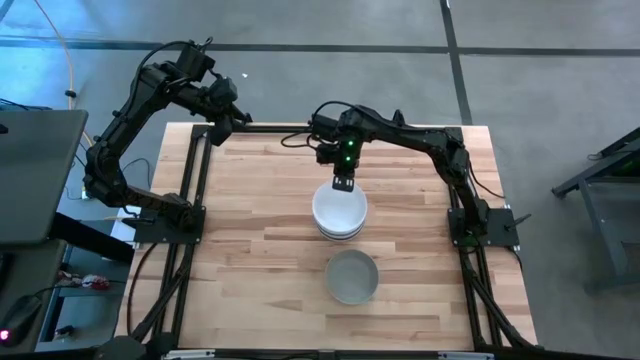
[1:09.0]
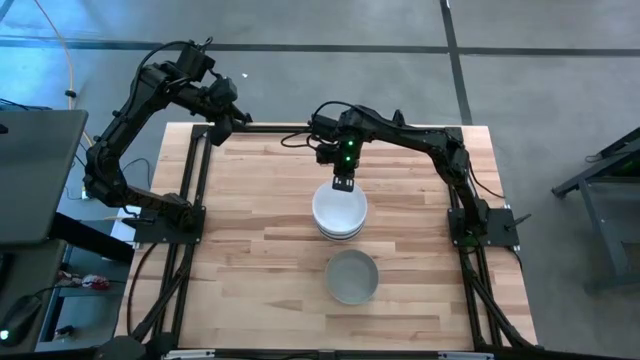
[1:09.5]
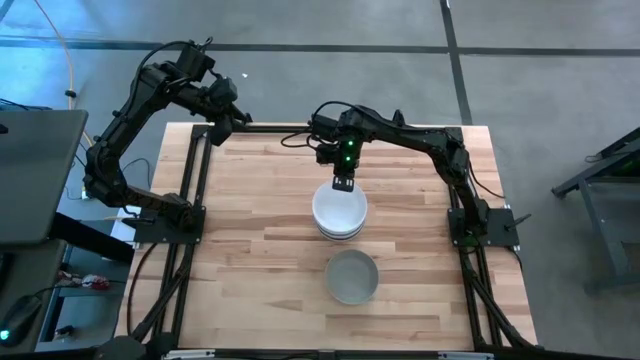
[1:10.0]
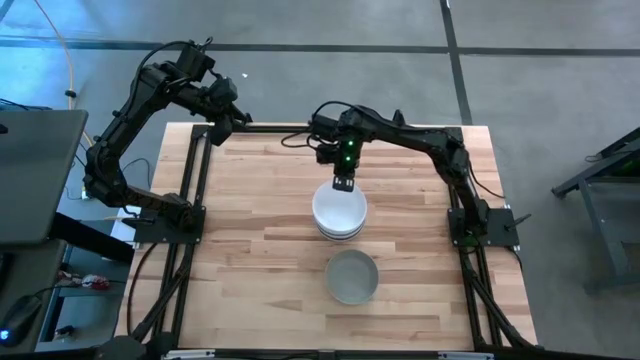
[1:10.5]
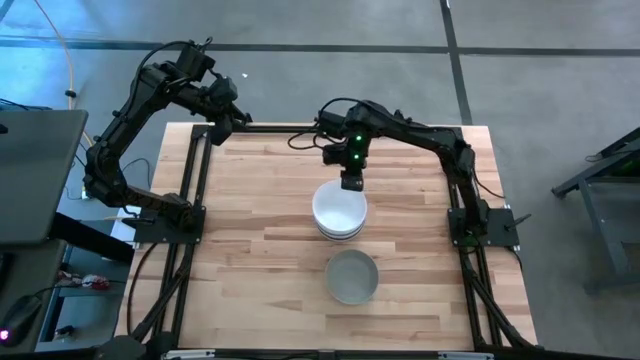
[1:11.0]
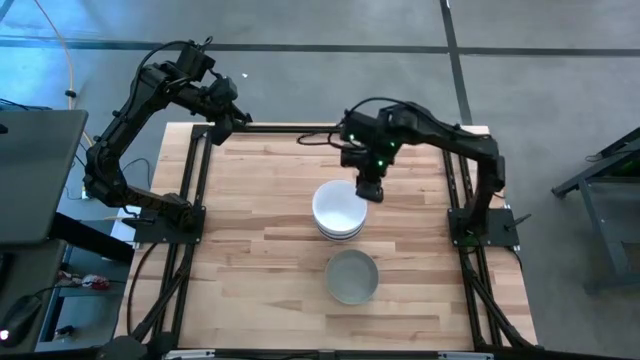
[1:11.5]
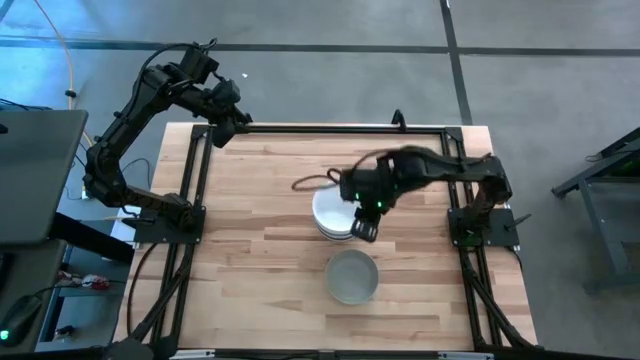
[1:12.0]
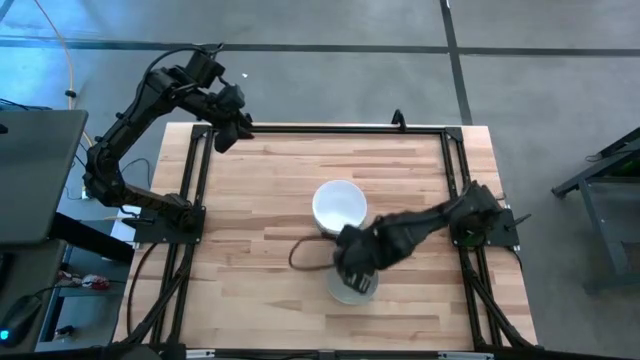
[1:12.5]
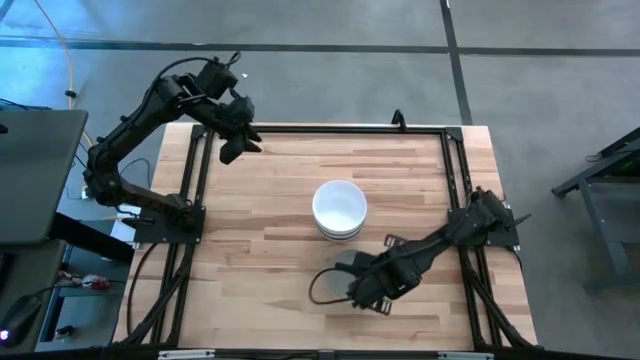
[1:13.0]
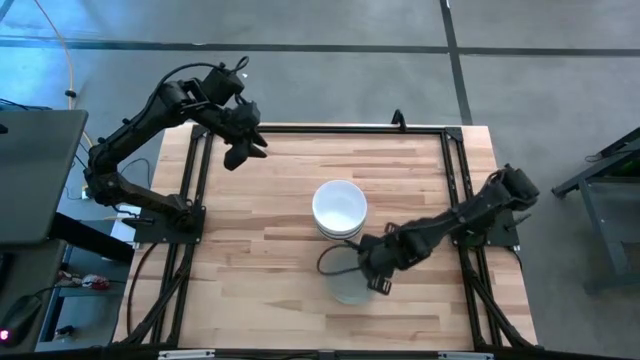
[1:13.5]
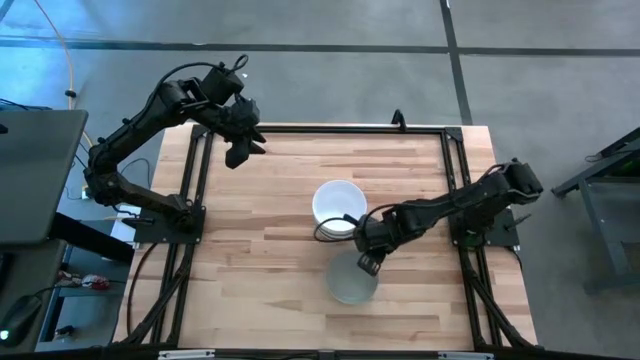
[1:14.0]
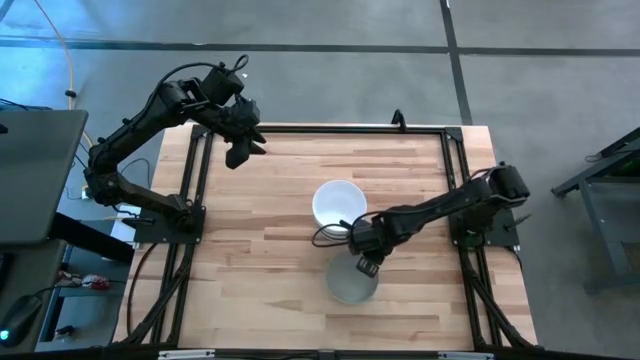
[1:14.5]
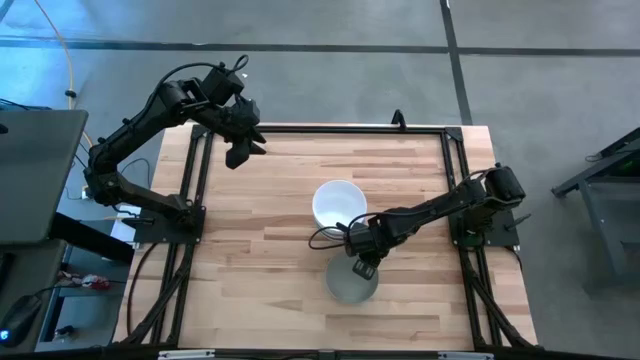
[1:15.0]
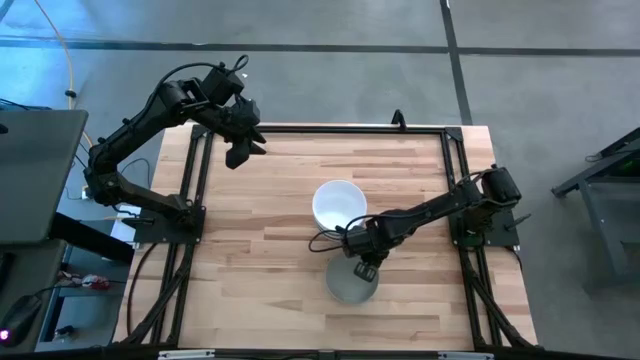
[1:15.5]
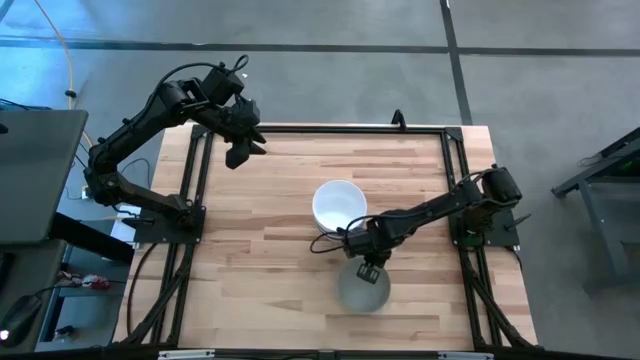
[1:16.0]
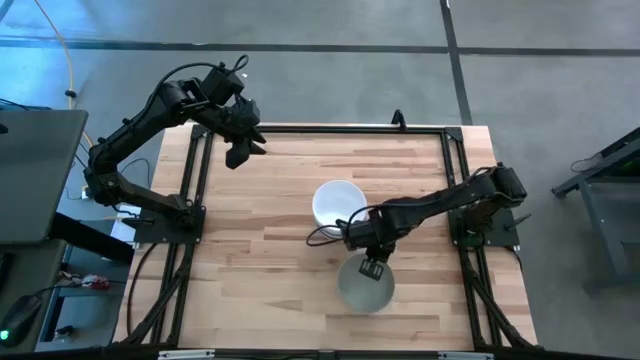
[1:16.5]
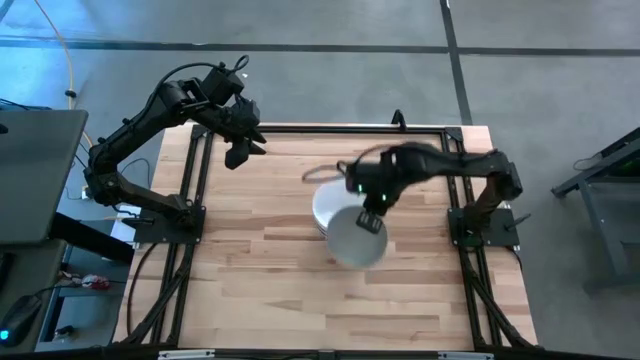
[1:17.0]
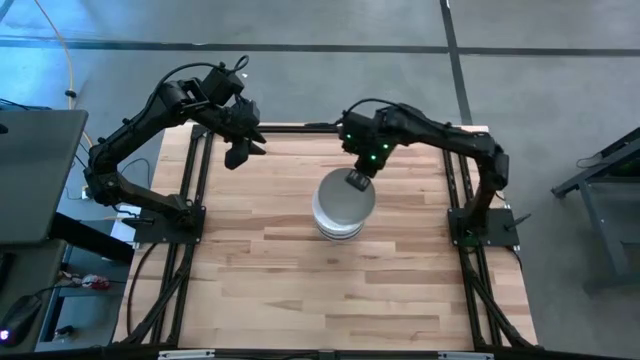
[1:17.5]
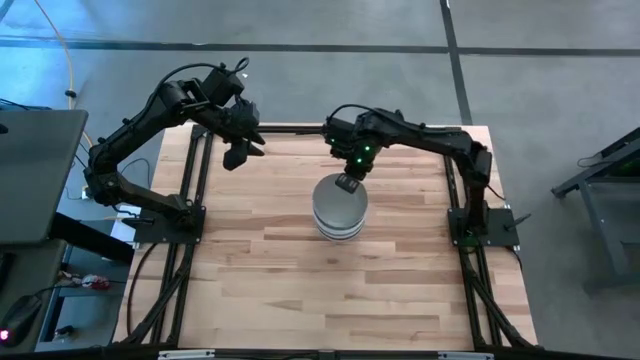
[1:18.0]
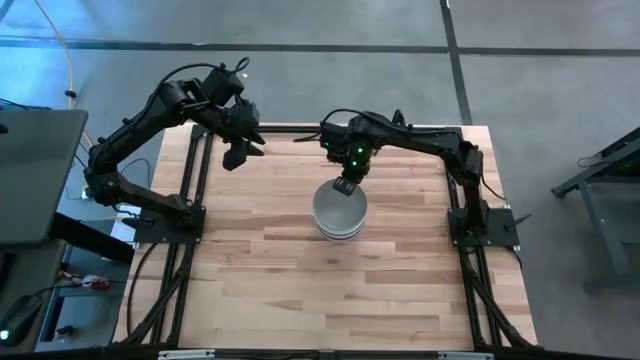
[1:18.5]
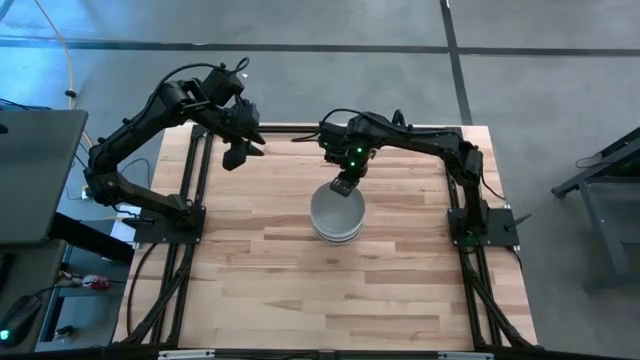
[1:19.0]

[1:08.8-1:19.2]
Task: Nest bowls inside each other
Stack the gray bowl on top of the white bowl

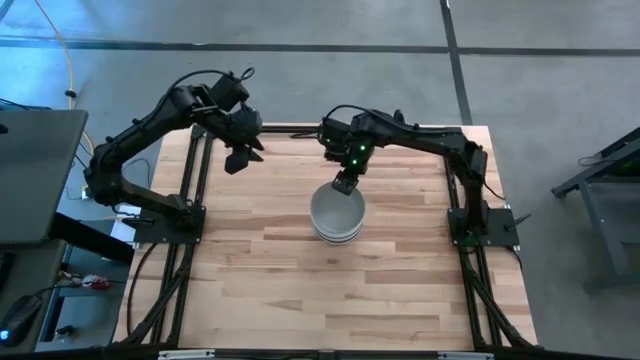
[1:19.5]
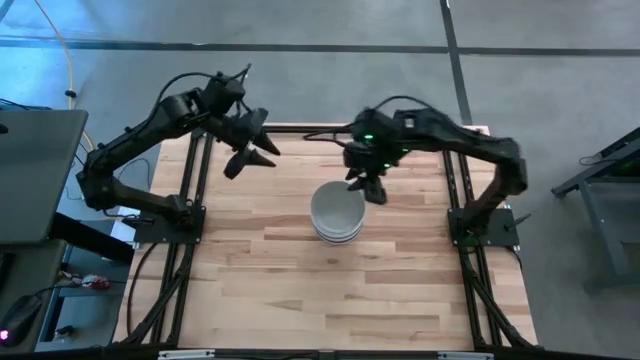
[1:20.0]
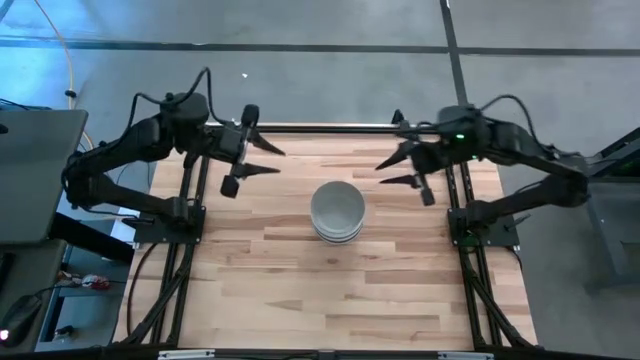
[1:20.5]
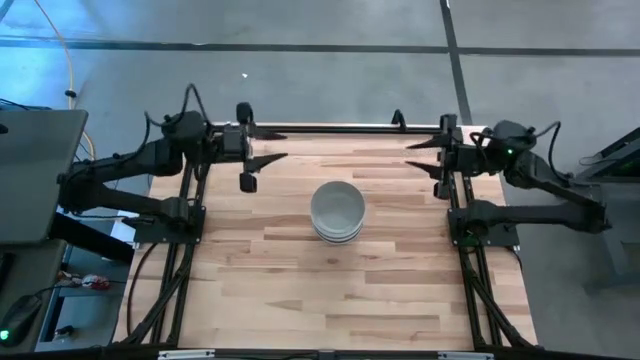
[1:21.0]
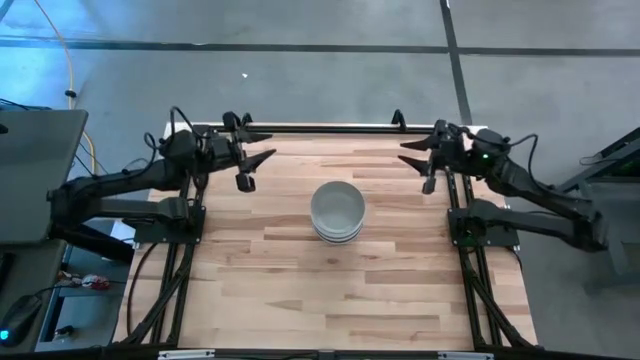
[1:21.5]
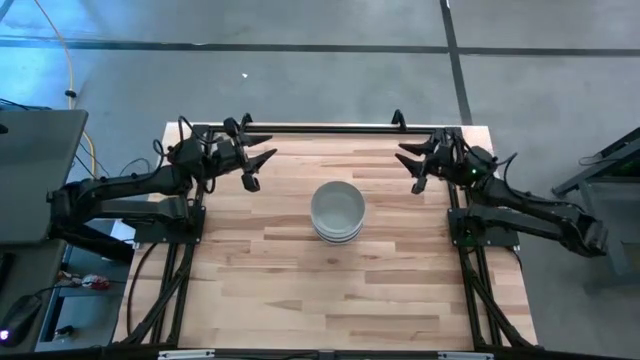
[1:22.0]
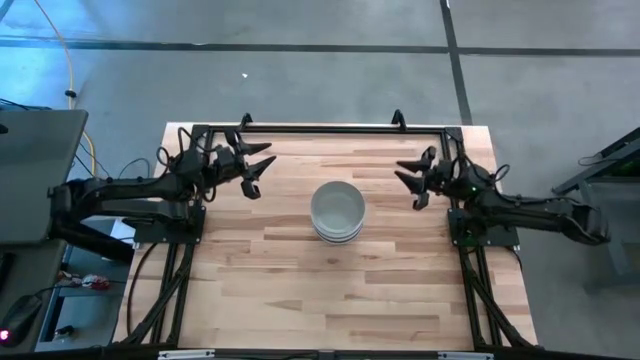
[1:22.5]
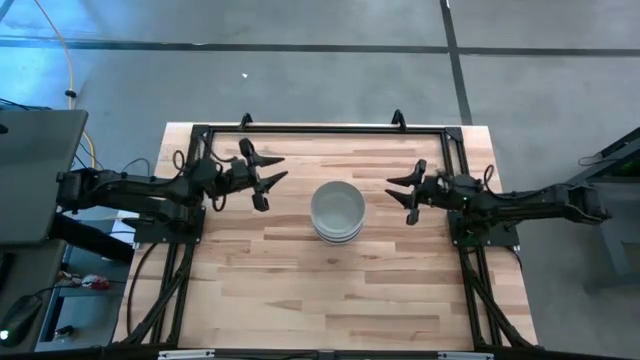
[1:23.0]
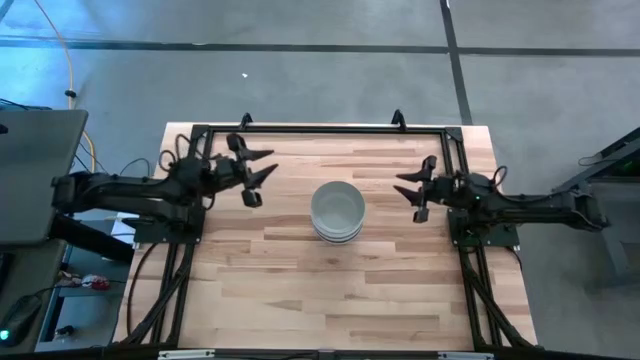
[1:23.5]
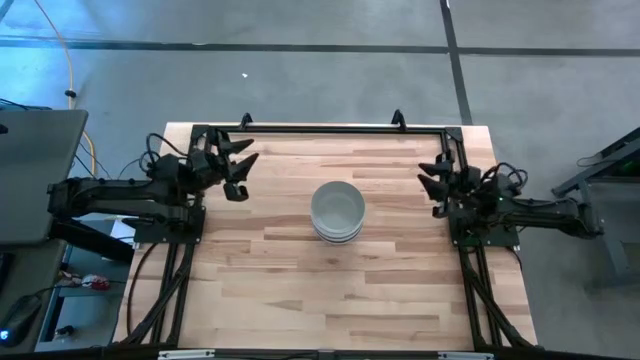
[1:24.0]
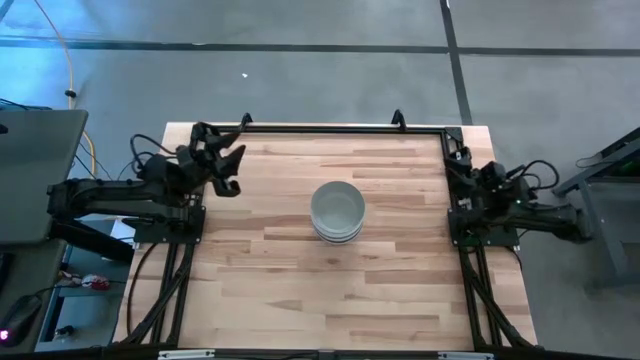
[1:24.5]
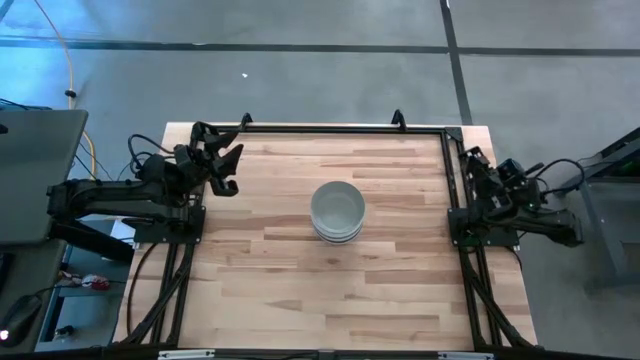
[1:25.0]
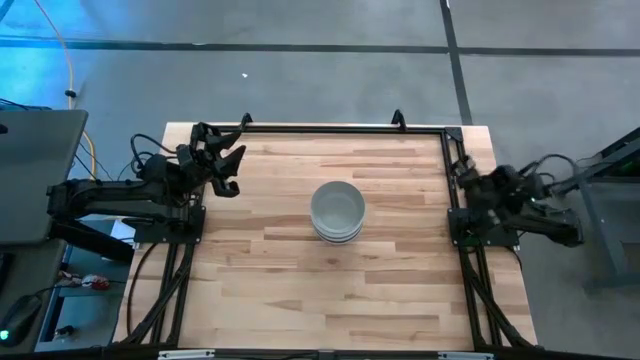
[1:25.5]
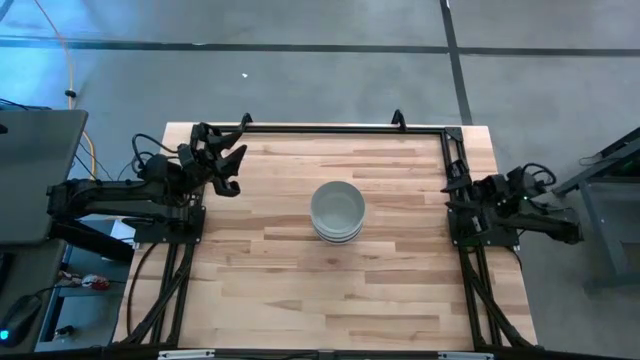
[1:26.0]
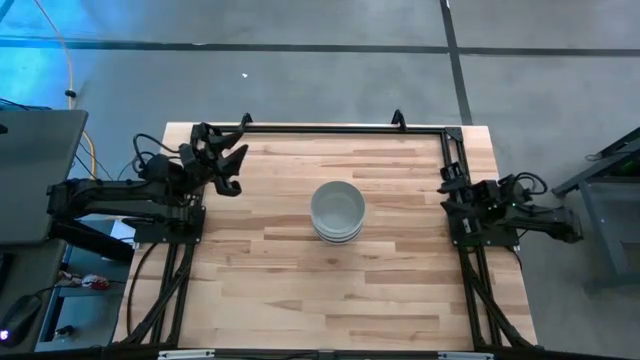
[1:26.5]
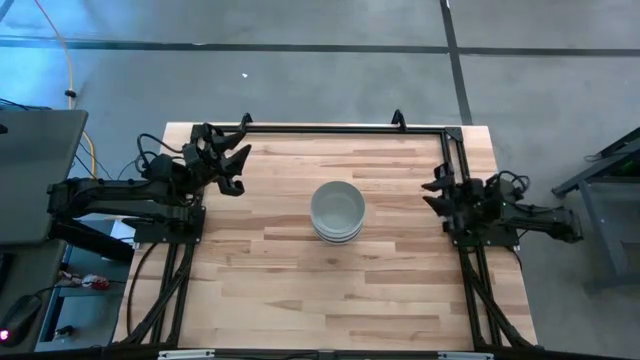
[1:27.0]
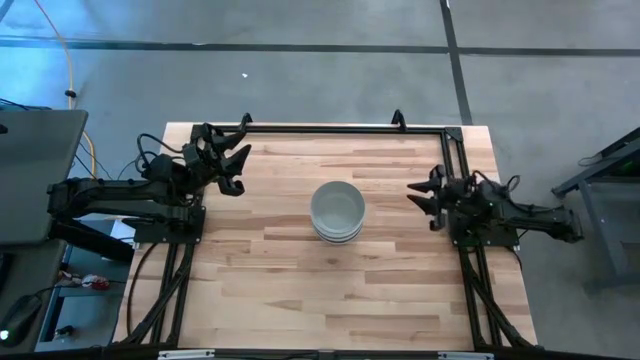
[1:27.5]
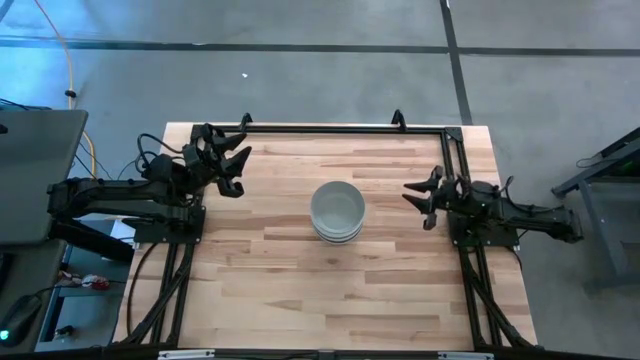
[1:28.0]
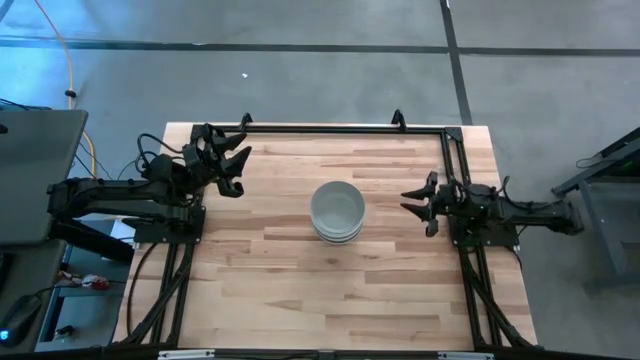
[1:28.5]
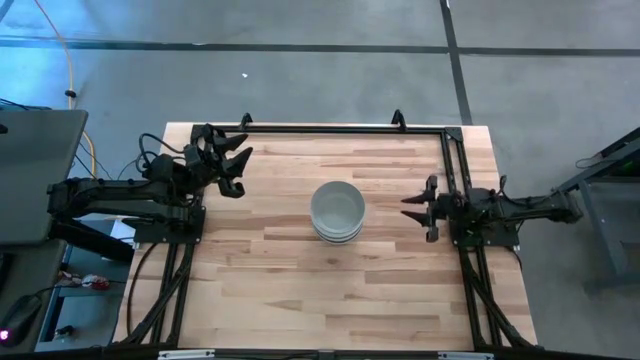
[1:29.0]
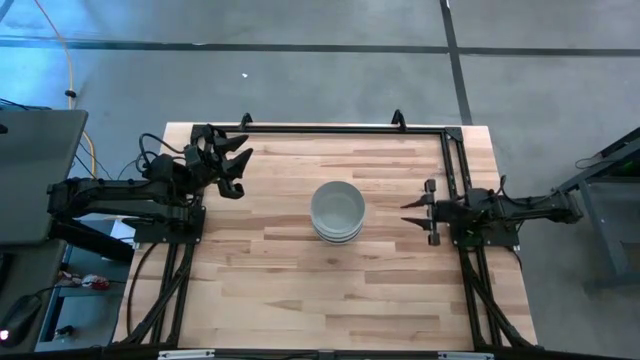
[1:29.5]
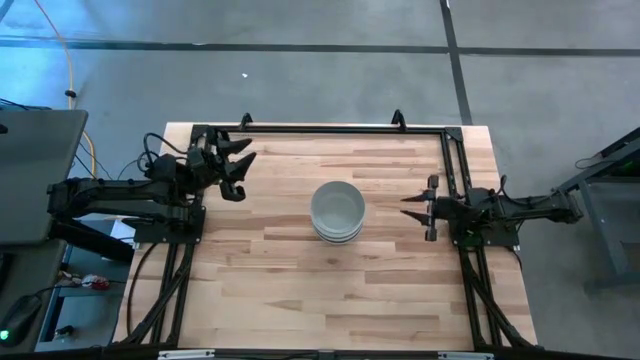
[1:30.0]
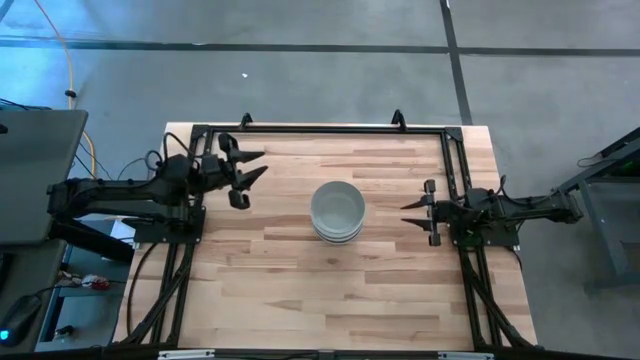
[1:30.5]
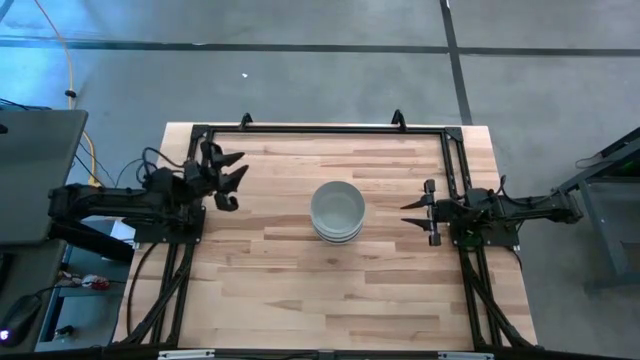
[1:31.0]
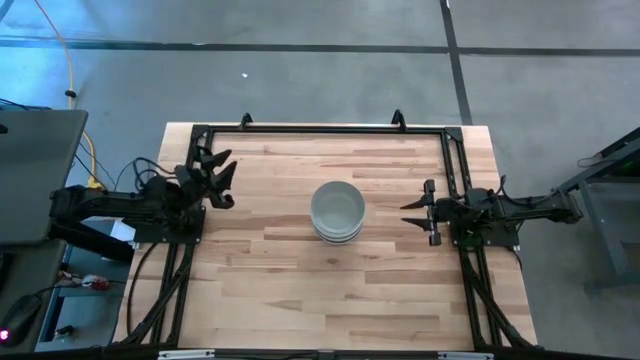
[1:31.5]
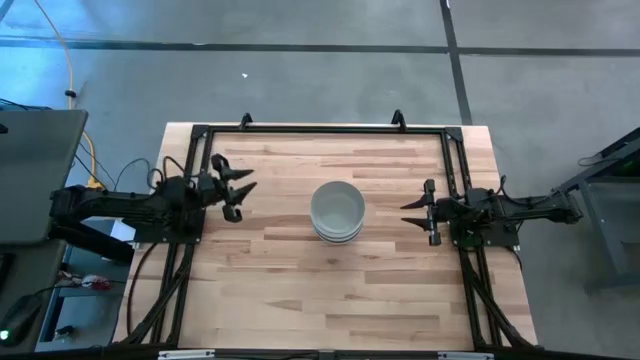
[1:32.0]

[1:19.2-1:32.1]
Return to Home Position
